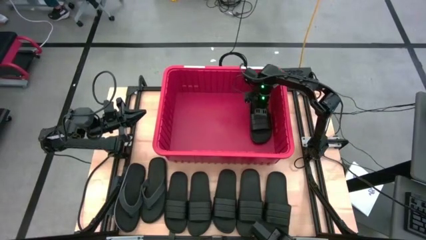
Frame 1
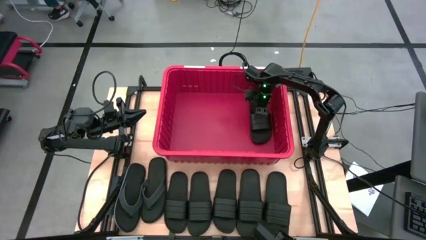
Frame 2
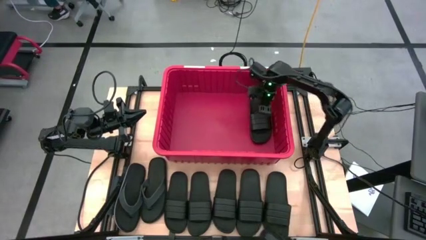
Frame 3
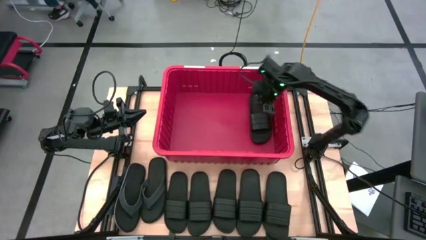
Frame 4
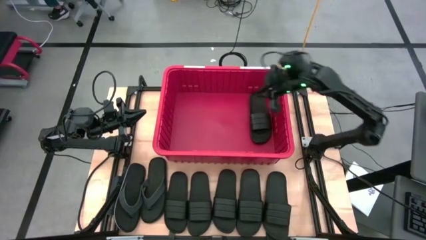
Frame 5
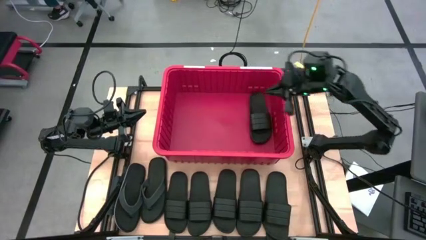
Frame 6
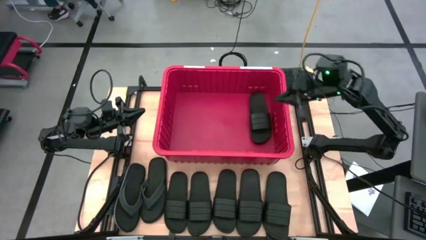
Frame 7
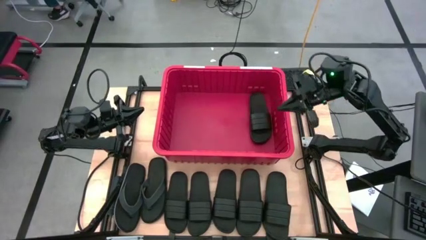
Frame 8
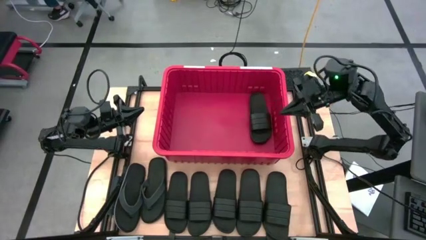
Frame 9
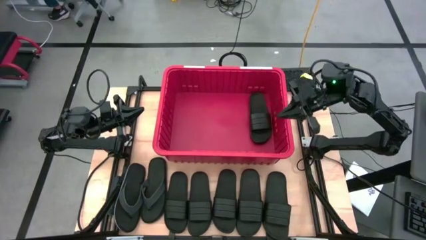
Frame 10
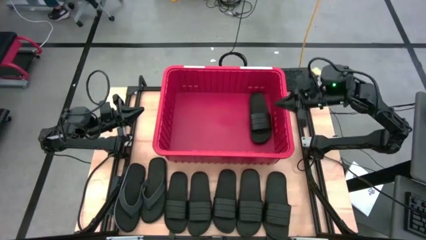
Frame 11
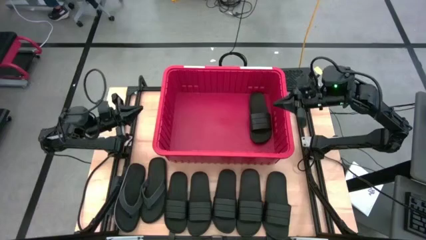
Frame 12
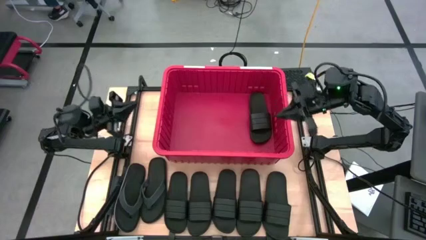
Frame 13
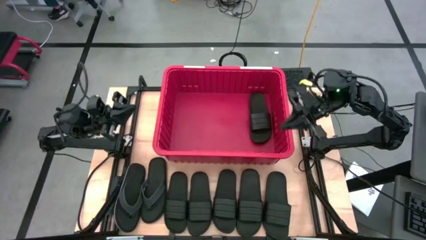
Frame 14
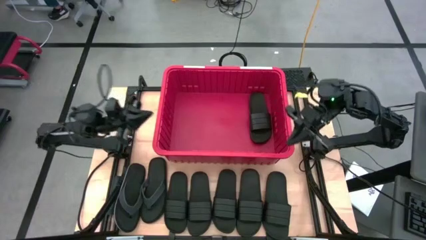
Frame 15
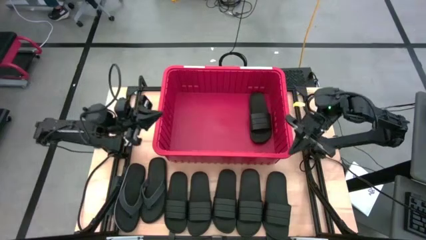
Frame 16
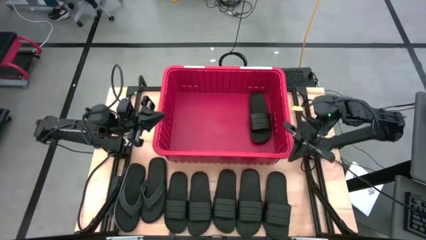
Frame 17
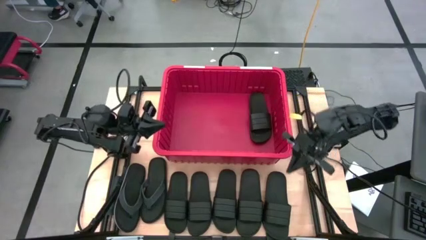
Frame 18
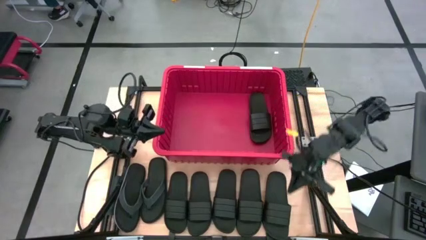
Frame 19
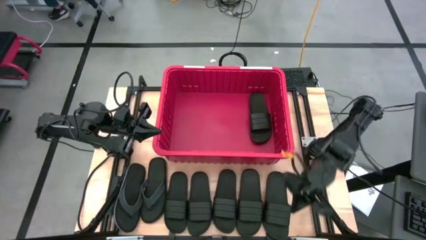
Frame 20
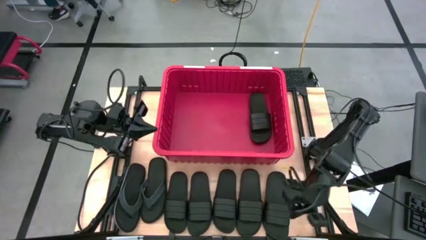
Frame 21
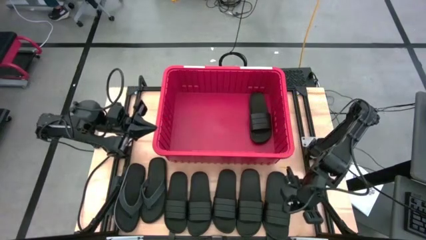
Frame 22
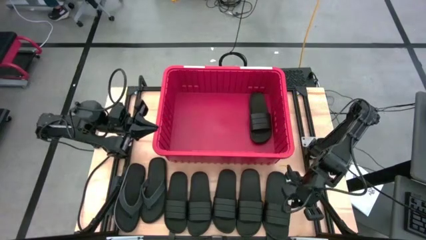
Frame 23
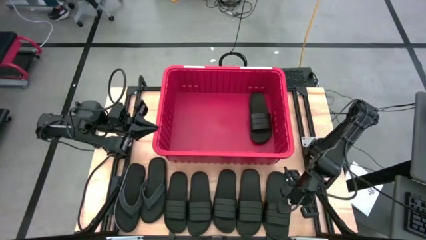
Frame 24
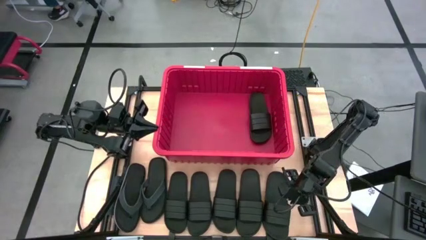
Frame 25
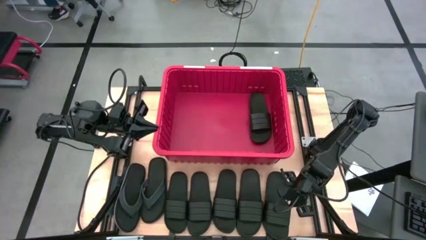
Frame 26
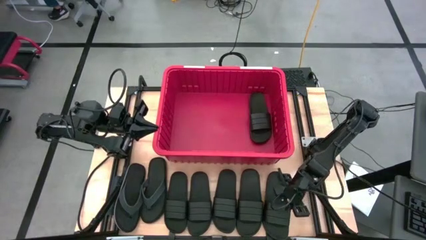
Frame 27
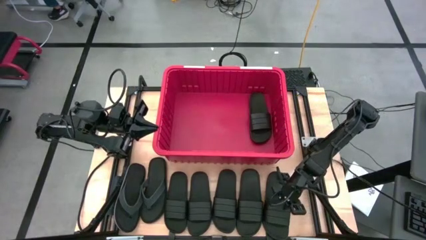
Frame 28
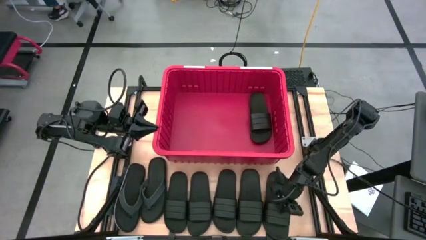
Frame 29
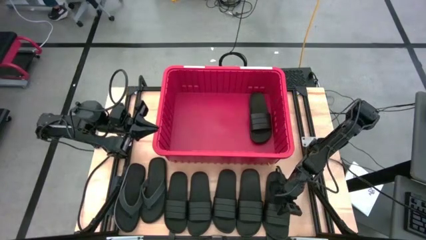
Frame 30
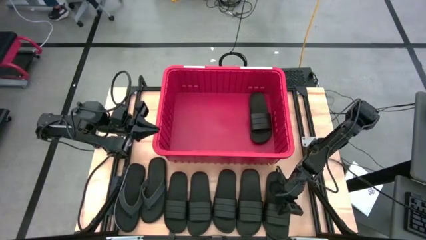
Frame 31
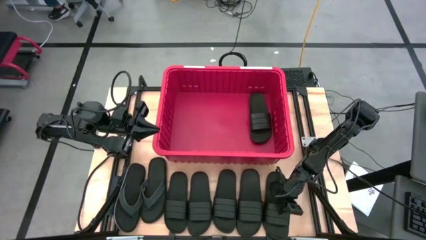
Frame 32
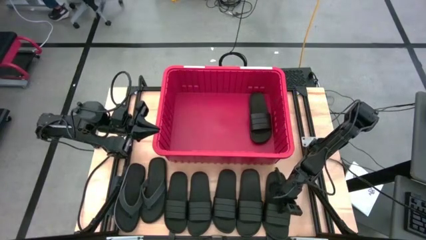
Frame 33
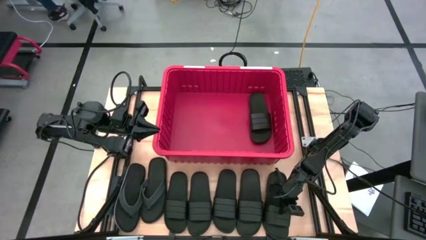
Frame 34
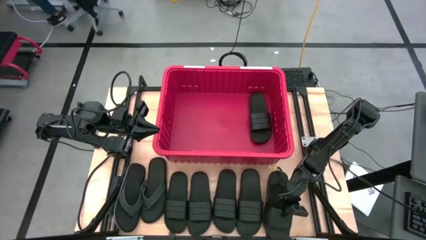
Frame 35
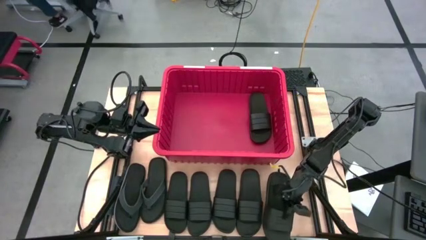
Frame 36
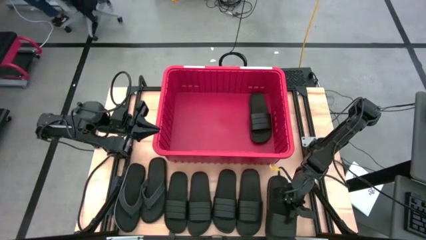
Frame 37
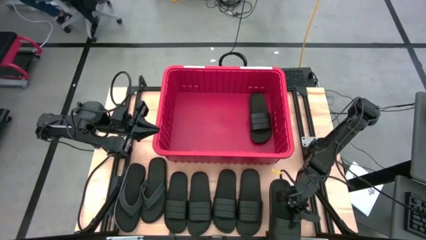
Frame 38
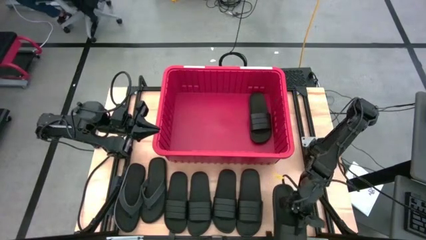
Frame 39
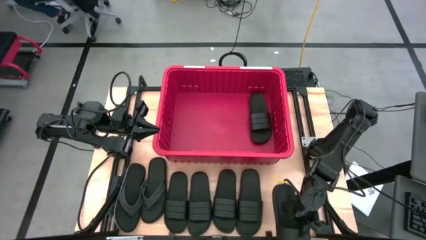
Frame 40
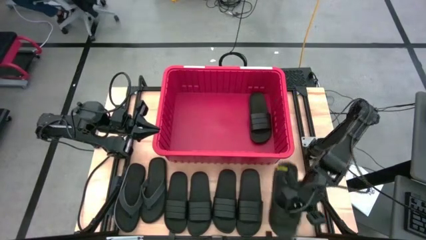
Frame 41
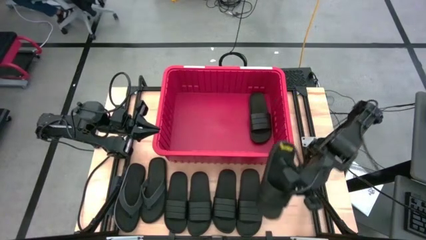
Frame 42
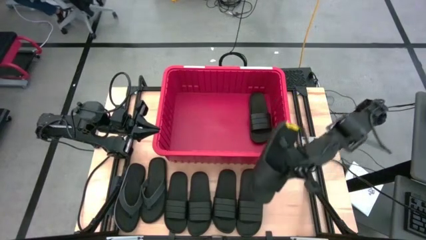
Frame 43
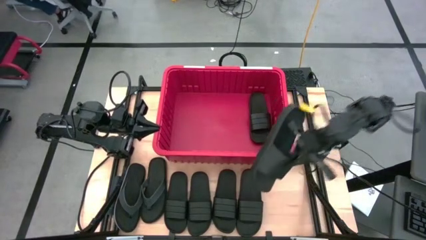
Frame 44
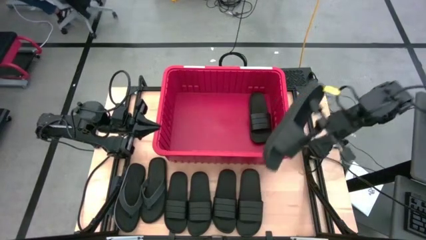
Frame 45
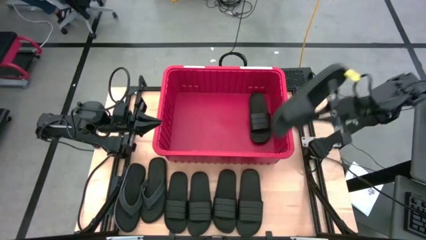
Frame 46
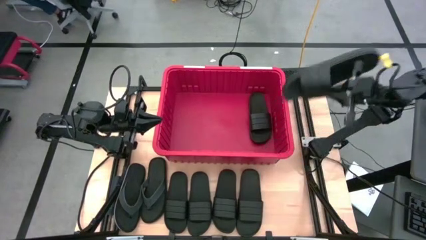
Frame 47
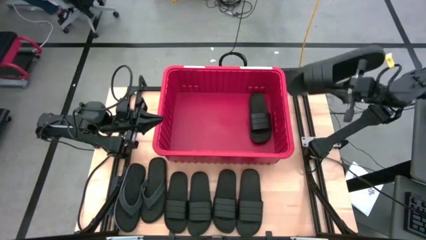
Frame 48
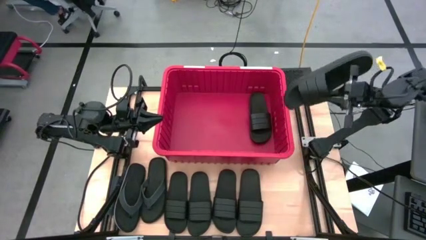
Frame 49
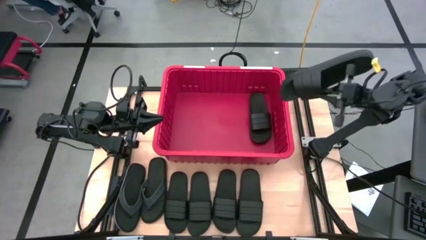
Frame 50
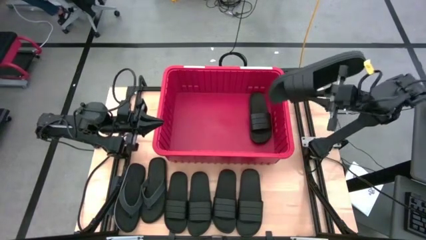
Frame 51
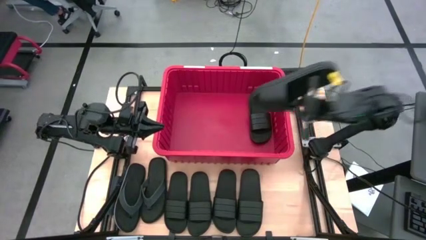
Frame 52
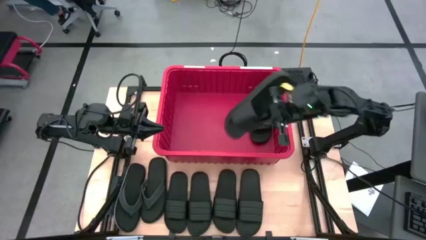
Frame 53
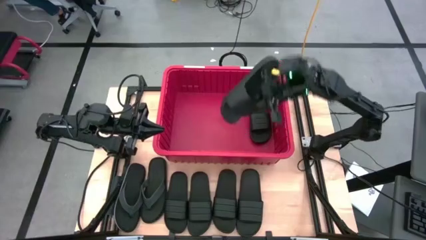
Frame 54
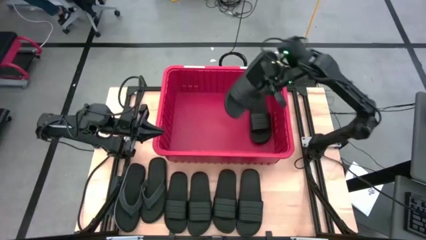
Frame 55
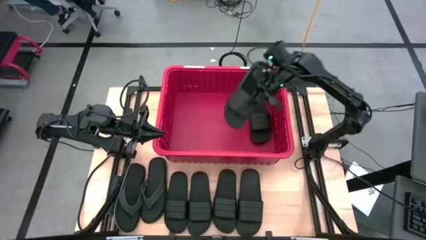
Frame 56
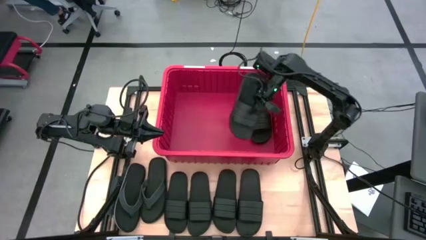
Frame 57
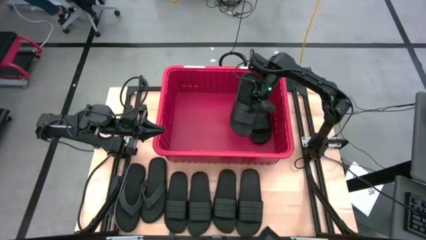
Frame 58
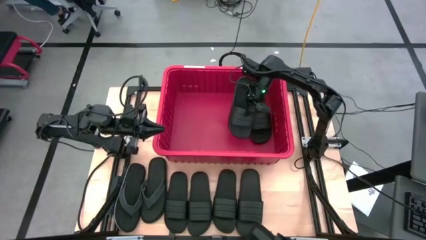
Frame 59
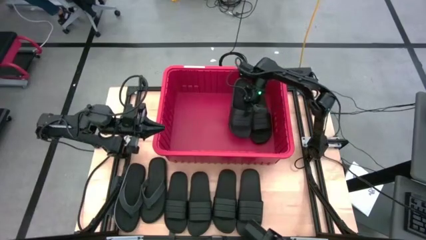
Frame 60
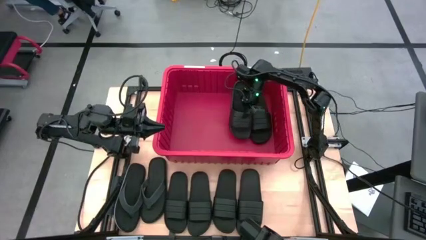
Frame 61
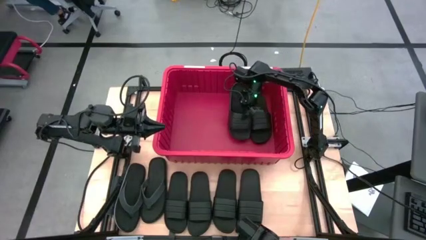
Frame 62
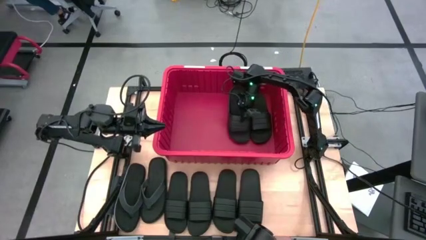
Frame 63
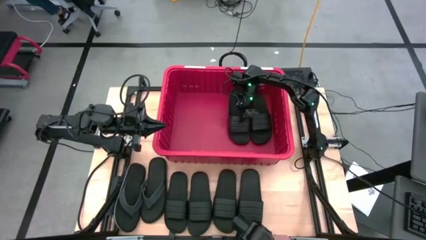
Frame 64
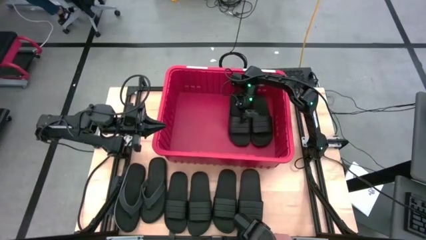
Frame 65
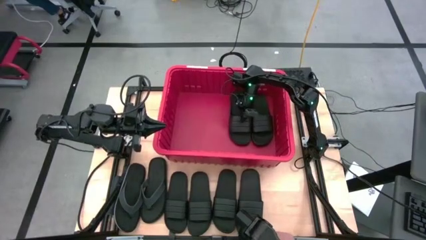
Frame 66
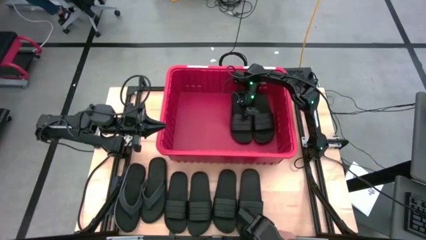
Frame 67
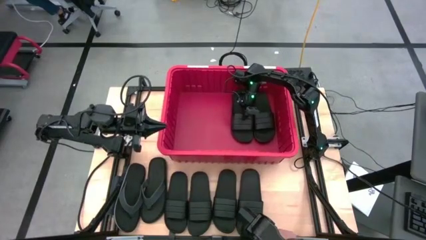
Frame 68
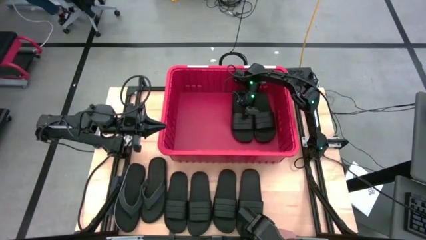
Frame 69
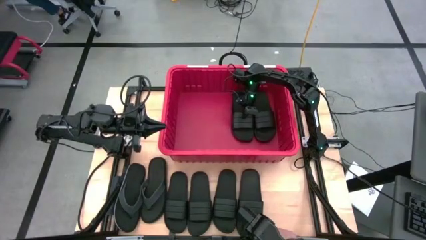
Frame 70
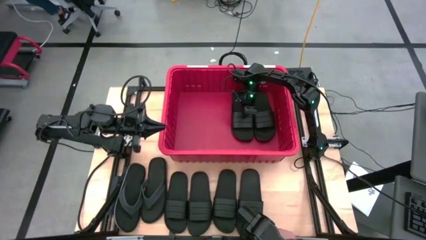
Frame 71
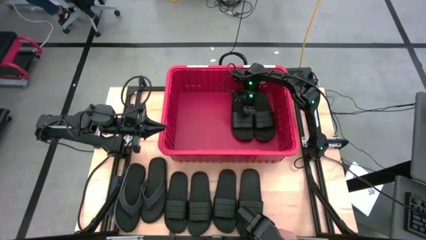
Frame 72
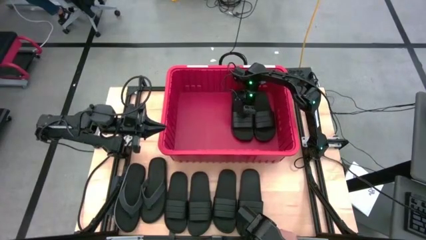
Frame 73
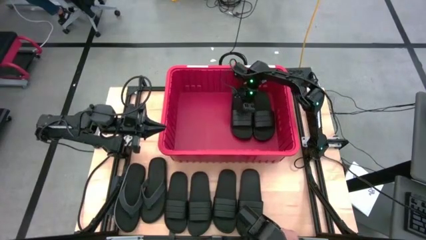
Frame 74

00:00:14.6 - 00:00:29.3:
Task: Pick and place slides into bin
Put the black slide into the red bin
